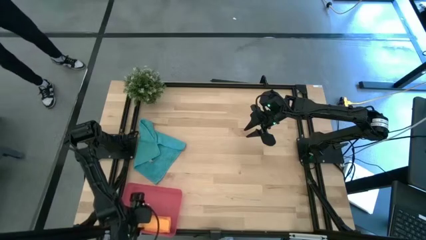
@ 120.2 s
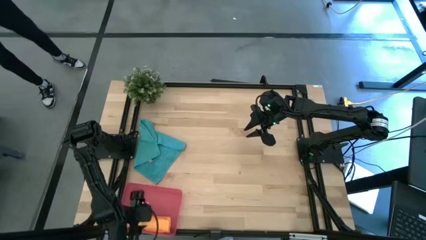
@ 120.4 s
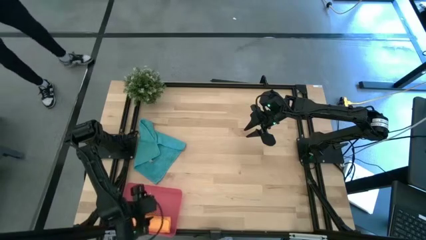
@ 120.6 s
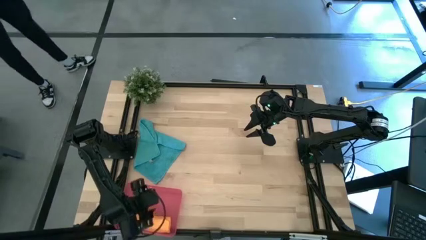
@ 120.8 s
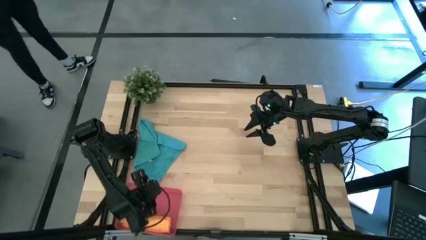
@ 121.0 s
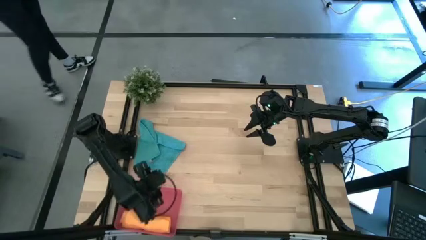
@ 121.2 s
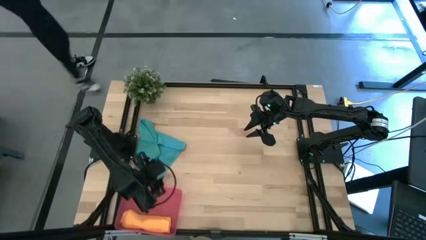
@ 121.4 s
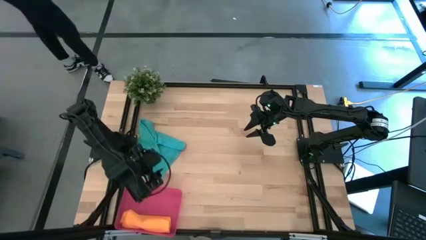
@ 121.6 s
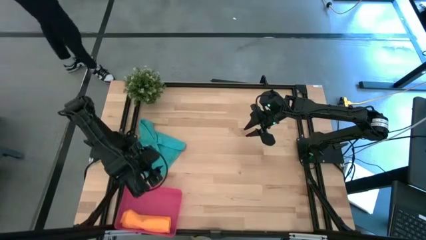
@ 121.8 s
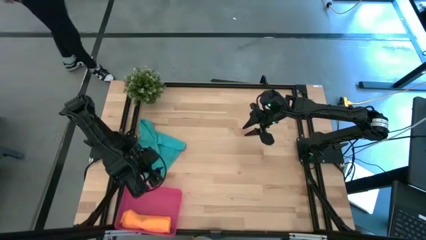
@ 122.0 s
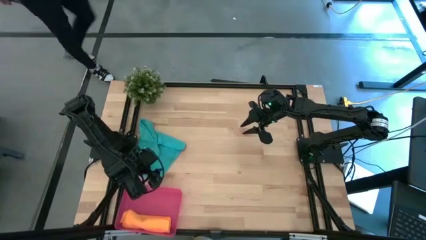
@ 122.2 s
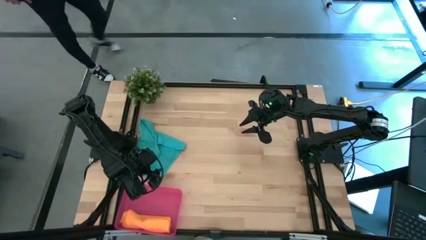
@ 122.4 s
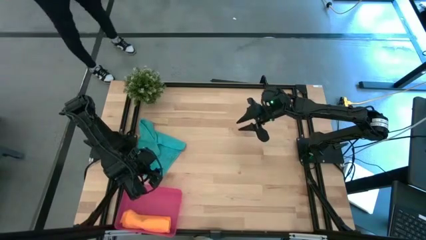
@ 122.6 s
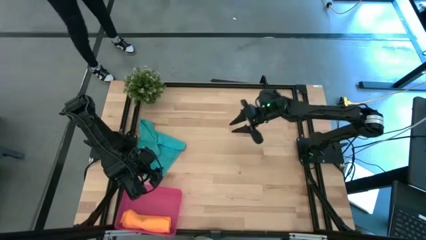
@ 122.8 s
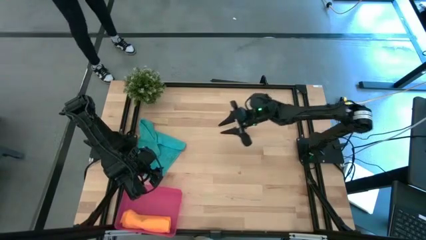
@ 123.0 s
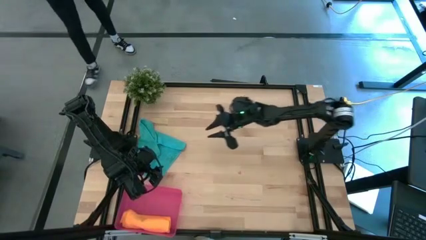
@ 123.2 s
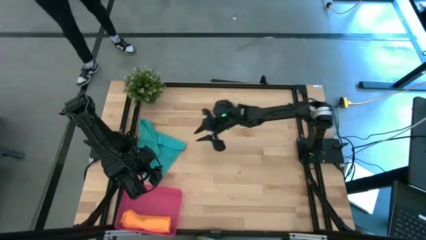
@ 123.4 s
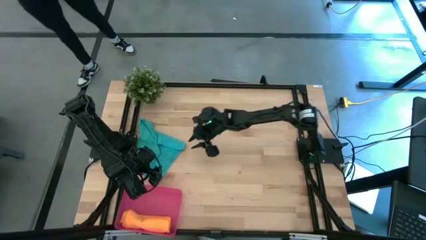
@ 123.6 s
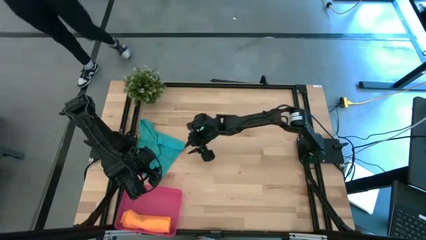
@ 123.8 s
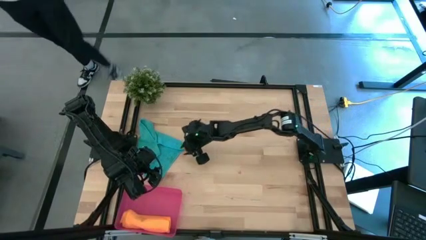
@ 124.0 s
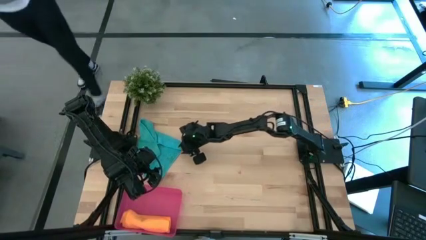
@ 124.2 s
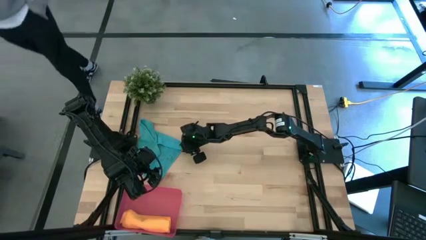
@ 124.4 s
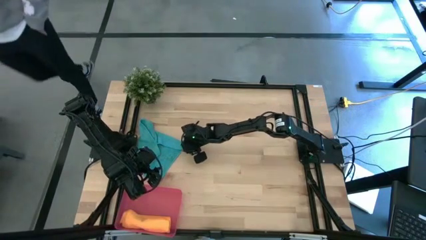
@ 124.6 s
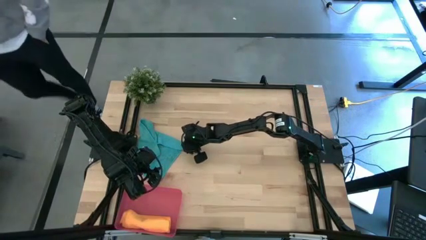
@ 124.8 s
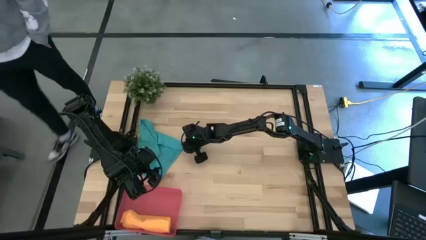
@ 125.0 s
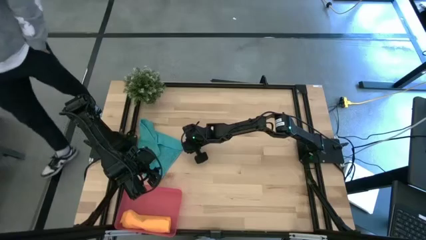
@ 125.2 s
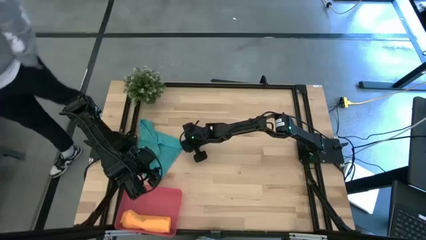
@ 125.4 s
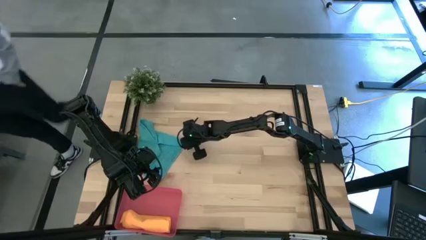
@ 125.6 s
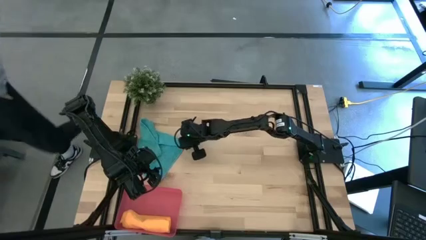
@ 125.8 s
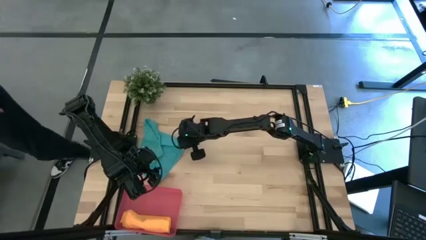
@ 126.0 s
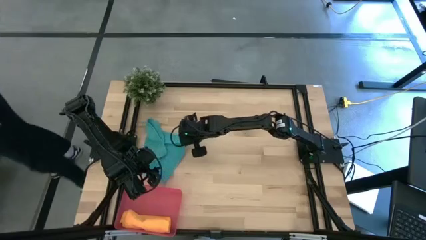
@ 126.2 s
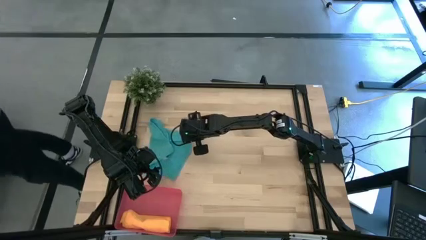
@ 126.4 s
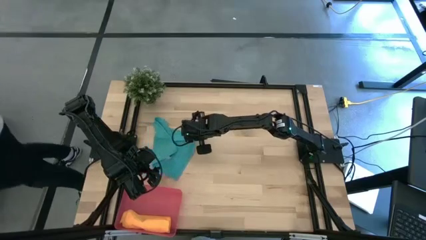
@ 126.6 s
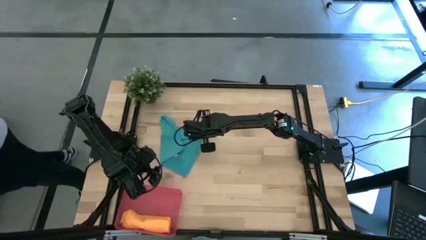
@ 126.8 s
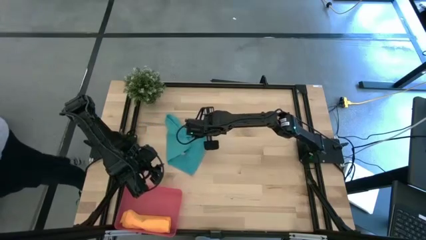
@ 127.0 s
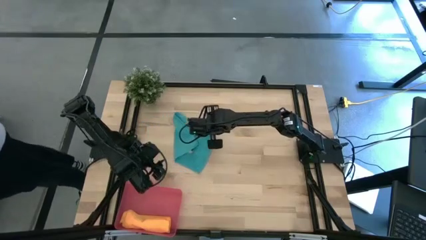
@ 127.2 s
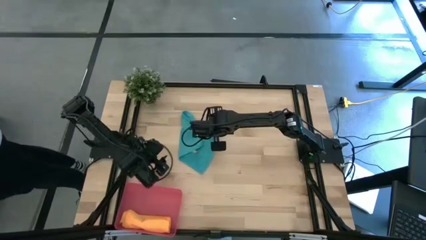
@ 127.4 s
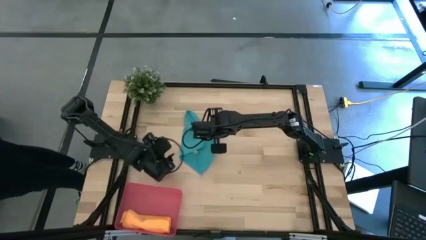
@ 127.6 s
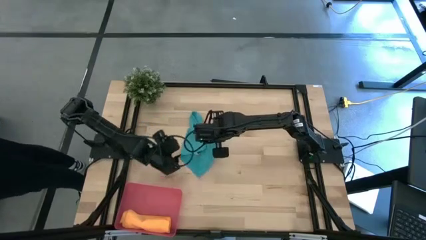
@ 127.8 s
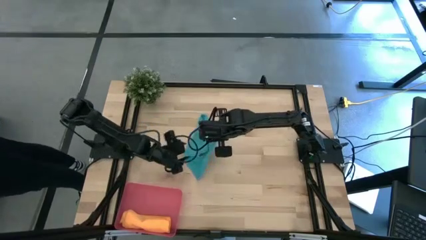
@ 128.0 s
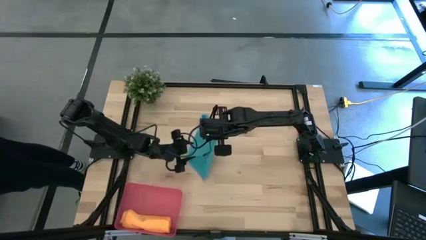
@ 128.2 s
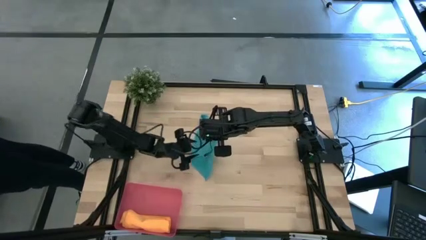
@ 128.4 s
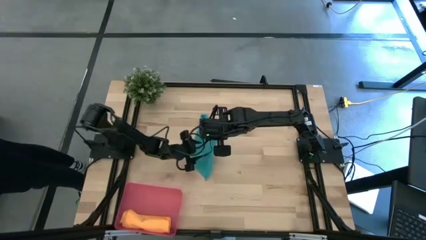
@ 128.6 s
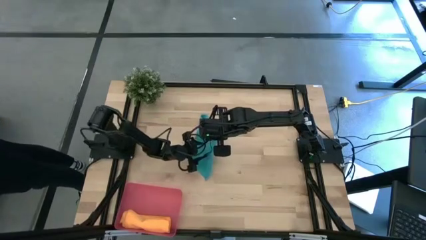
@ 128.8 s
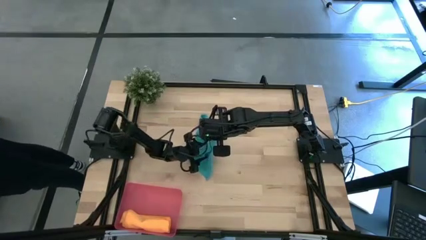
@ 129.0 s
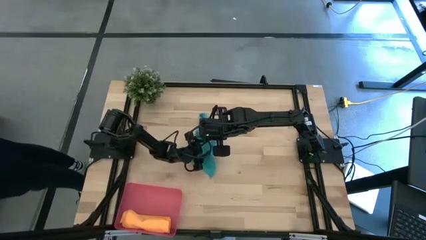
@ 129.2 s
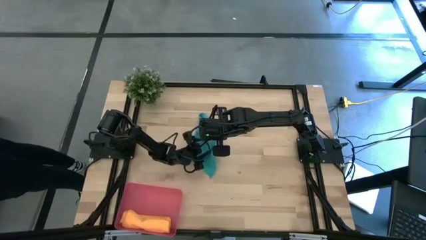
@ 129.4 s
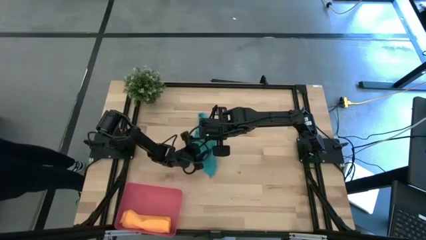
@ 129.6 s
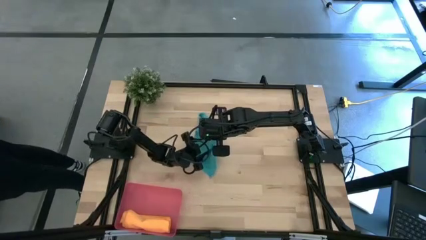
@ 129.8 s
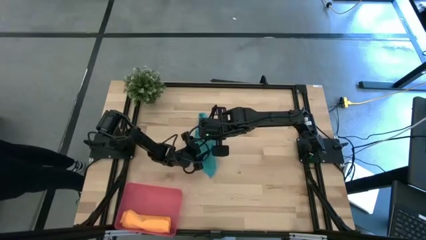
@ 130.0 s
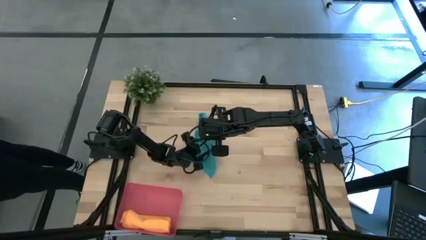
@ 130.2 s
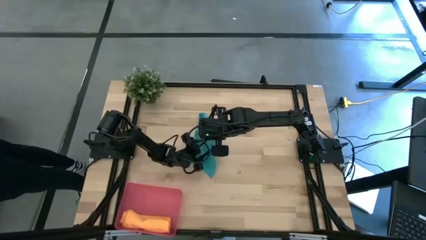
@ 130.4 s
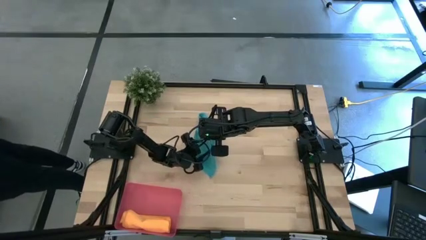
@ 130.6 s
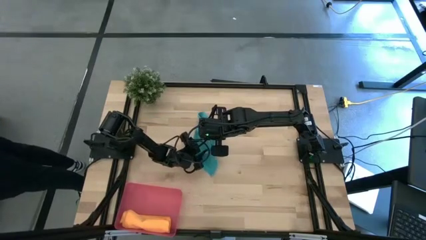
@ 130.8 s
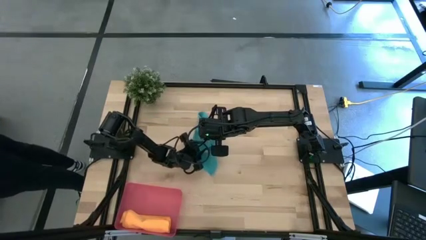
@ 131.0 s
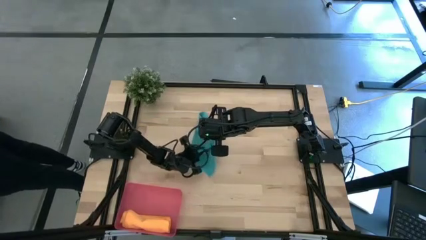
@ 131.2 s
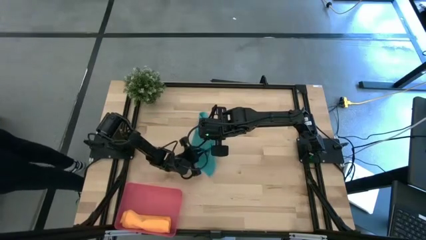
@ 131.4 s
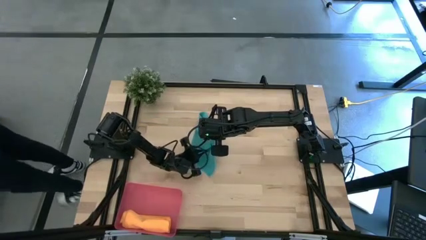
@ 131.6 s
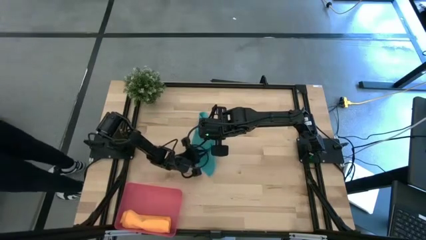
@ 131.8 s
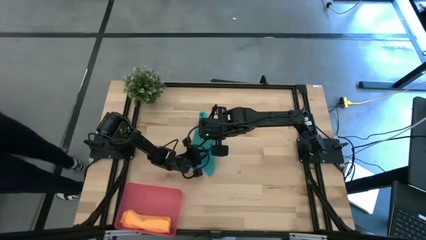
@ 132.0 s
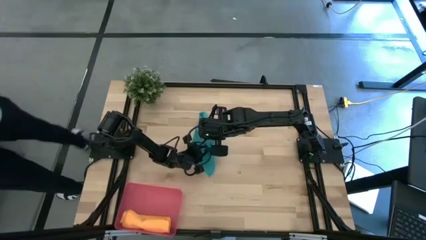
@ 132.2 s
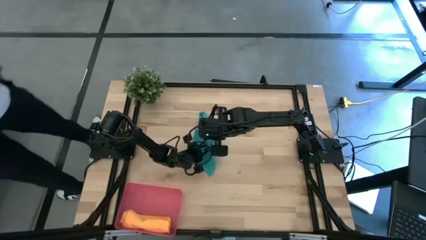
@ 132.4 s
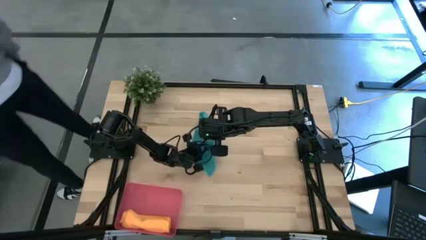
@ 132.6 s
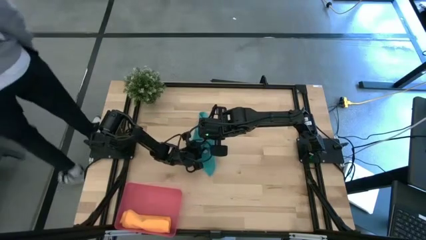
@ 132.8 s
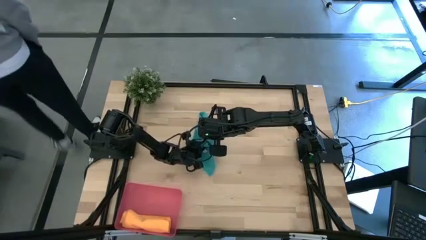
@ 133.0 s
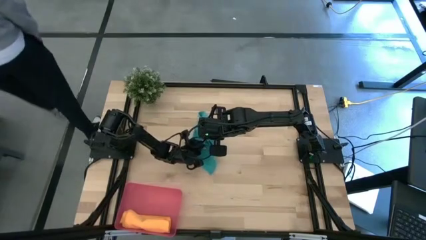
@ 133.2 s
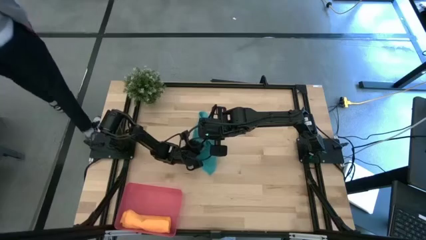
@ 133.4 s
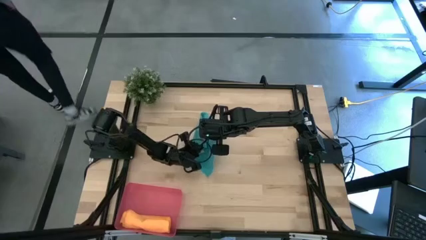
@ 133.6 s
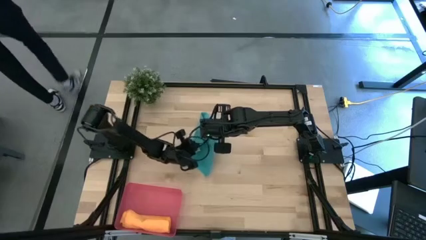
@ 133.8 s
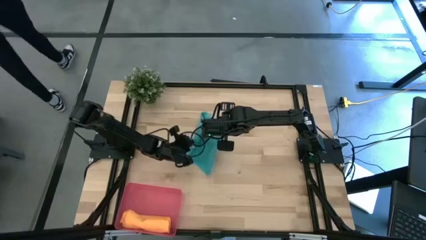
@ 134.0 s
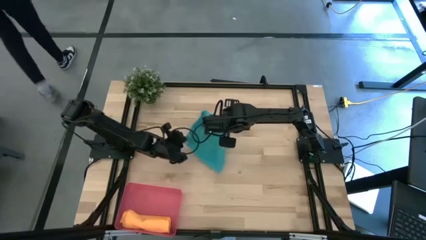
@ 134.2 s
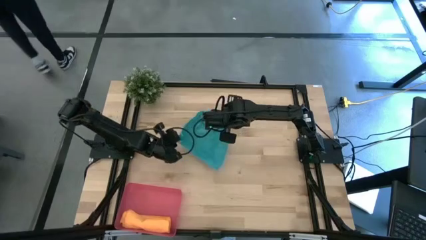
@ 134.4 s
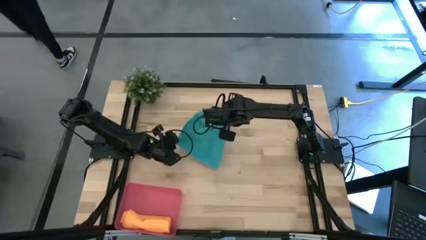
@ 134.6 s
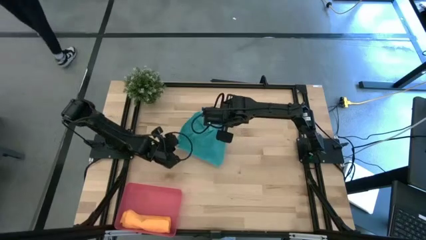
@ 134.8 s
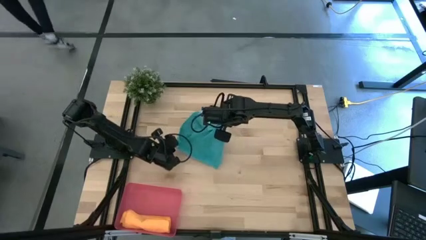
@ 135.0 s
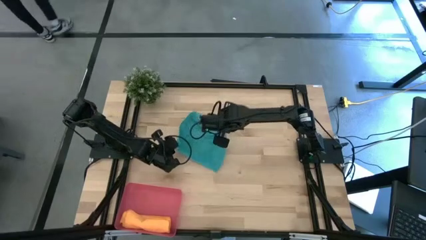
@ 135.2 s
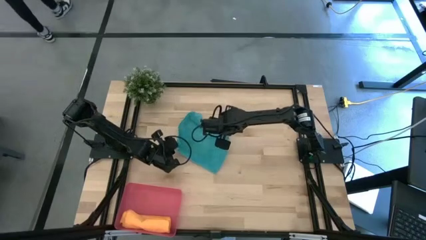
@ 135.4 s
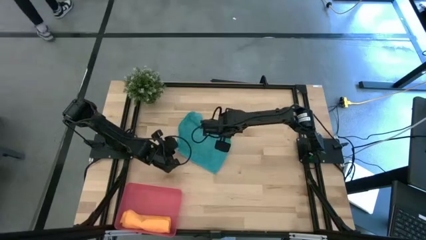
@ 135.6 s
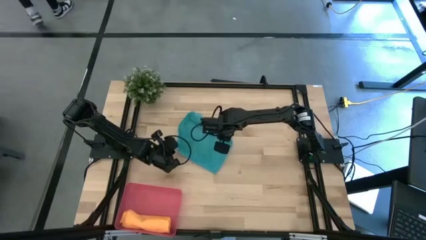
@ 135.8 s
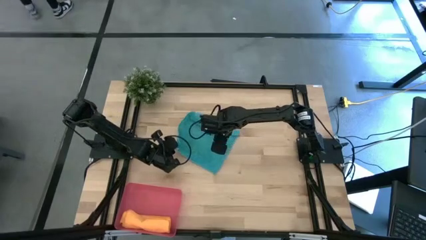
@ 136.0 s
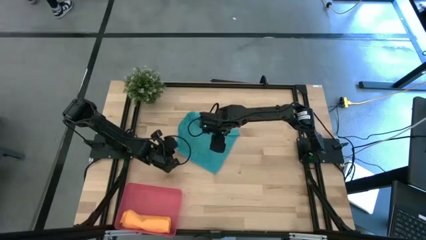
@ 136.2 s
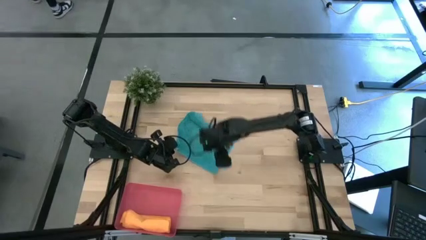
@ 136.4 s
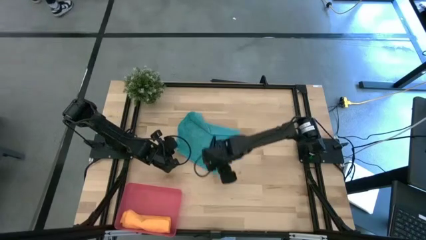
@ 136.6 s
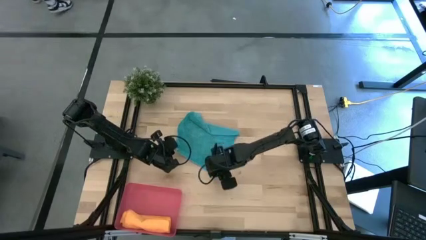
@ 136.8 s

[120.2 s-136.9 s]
Task: Roll microfiber towels into tight, uniform cylinder then place into a basket
Fold the blue microfiber cloth
